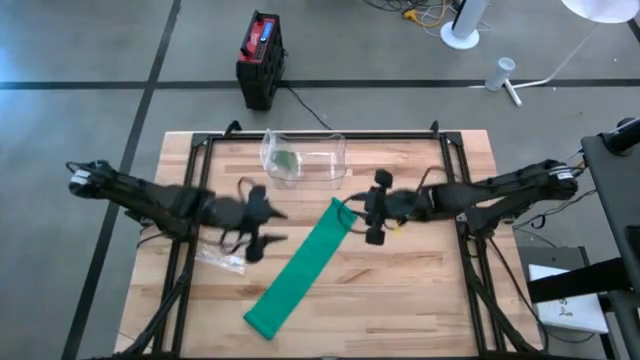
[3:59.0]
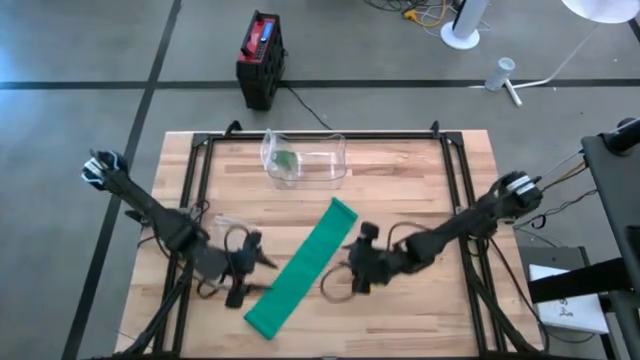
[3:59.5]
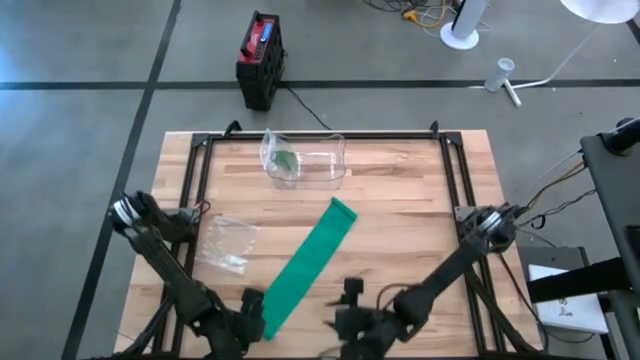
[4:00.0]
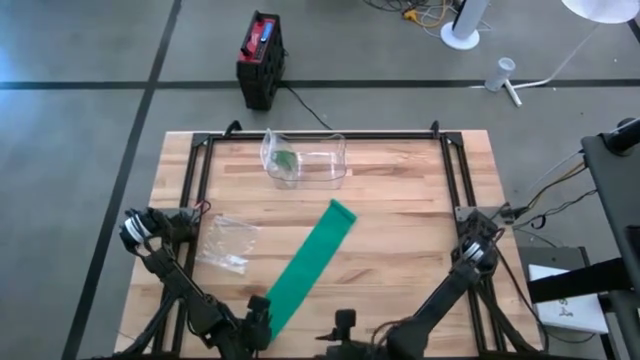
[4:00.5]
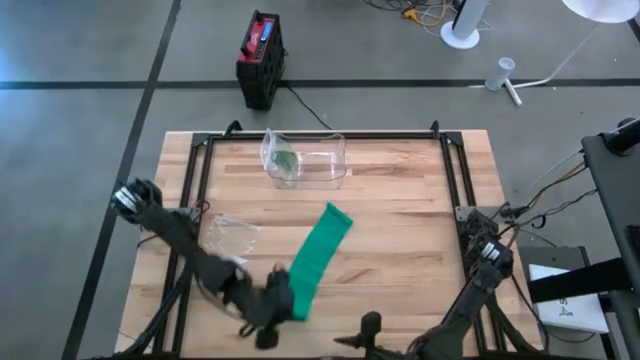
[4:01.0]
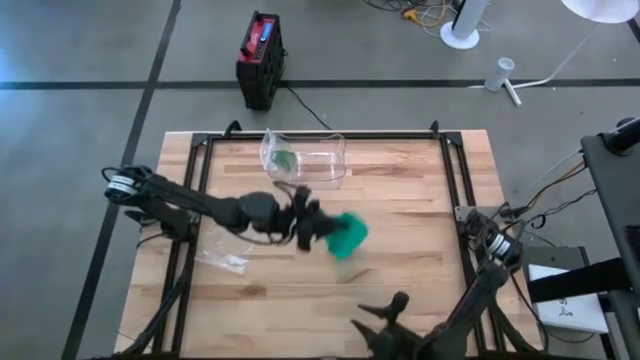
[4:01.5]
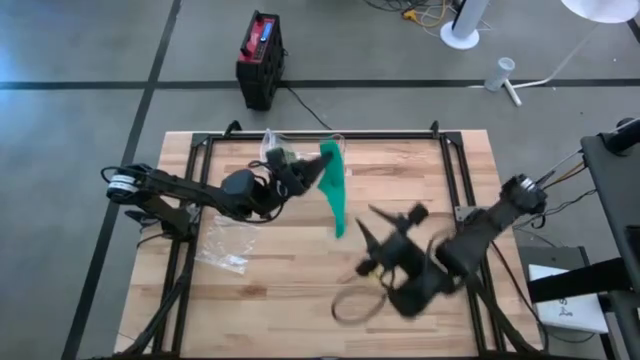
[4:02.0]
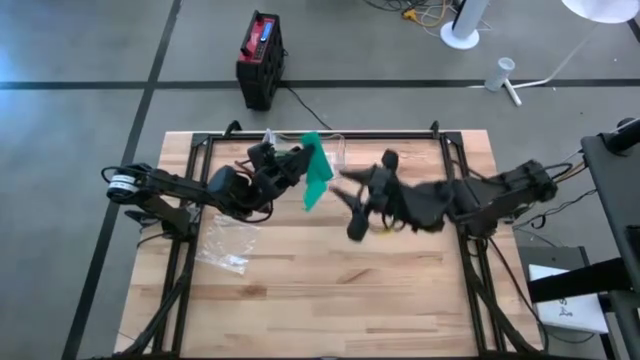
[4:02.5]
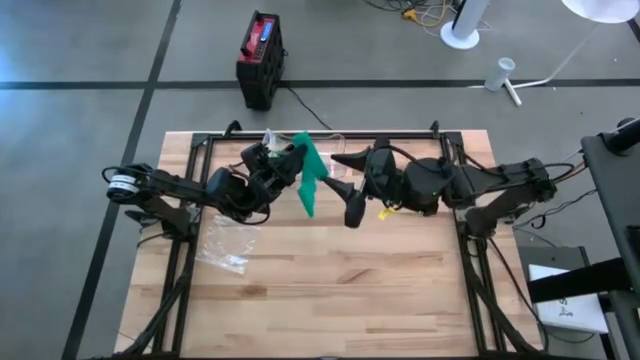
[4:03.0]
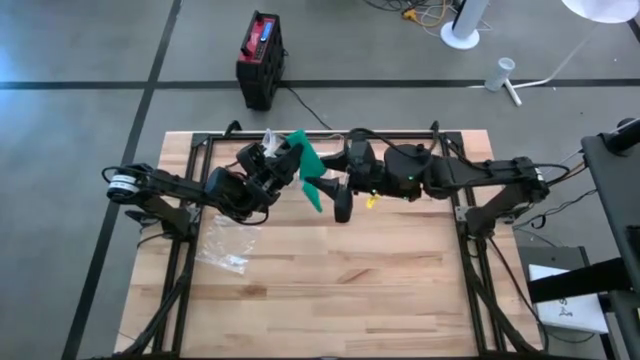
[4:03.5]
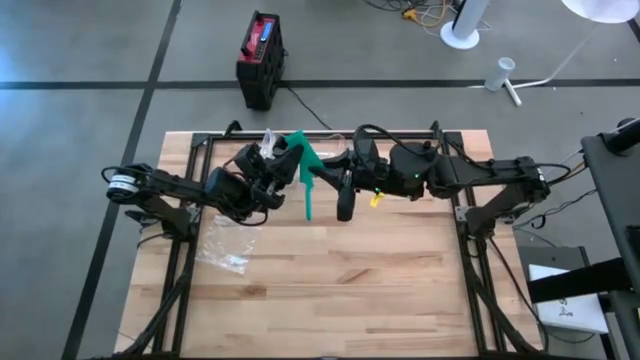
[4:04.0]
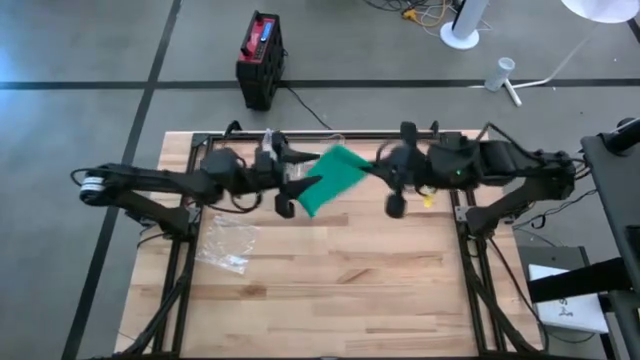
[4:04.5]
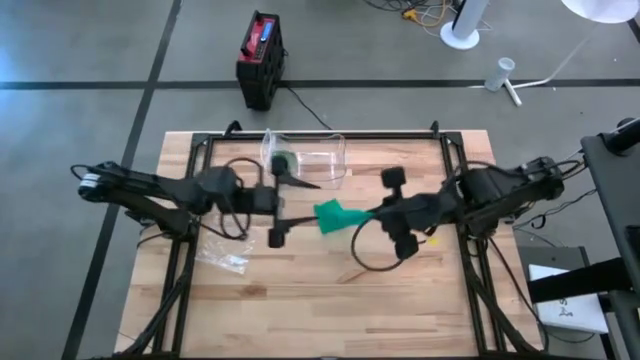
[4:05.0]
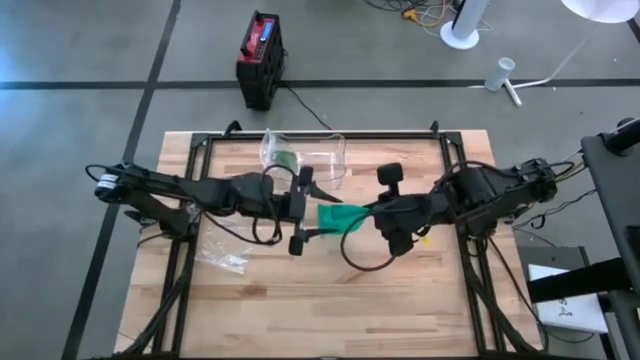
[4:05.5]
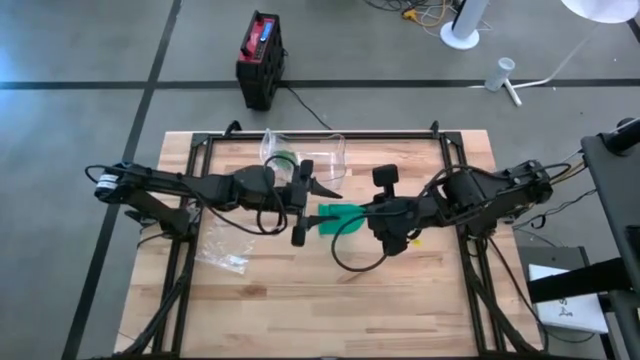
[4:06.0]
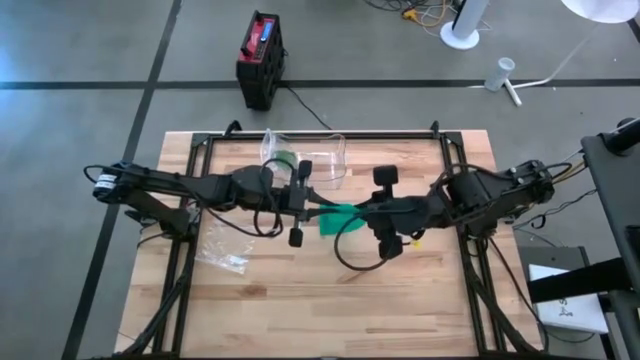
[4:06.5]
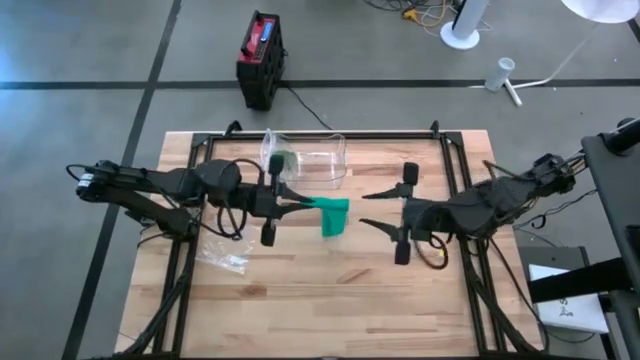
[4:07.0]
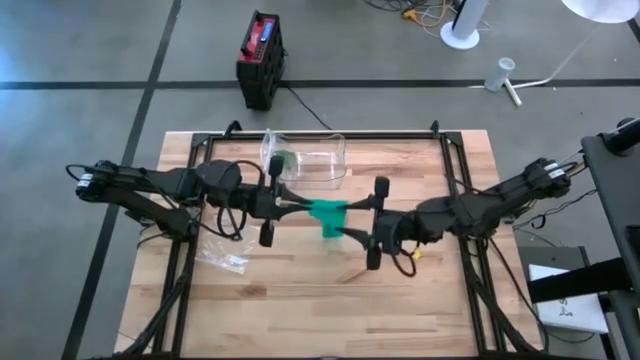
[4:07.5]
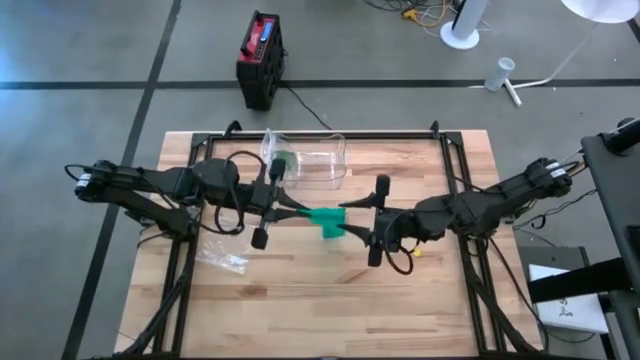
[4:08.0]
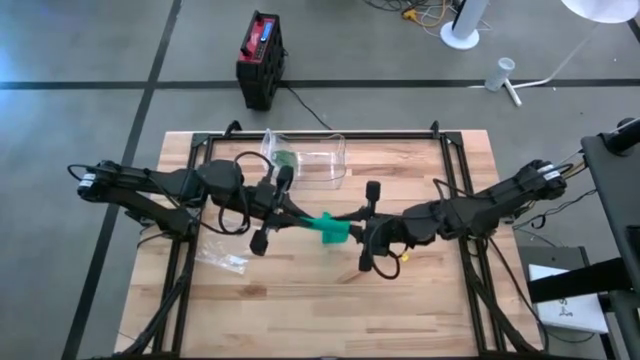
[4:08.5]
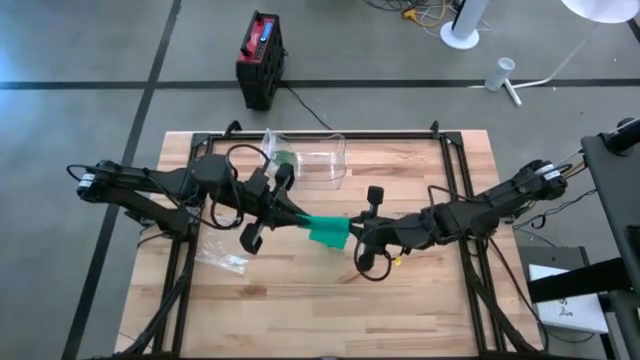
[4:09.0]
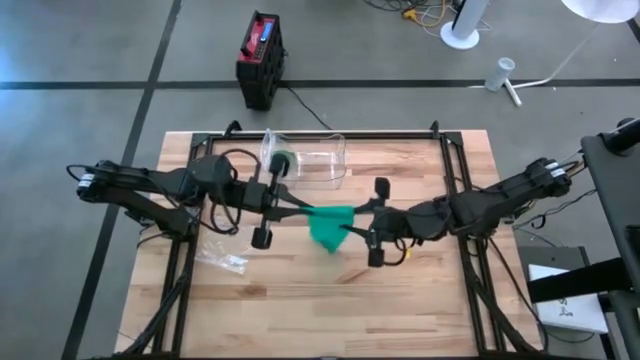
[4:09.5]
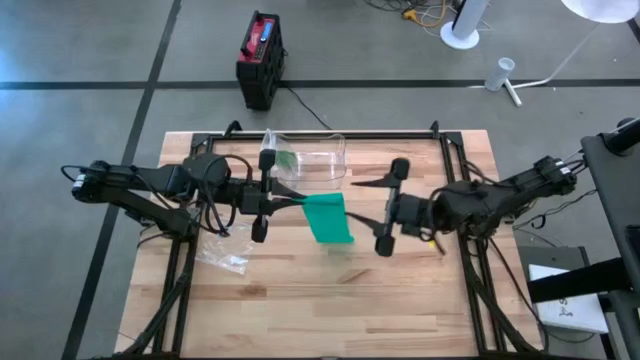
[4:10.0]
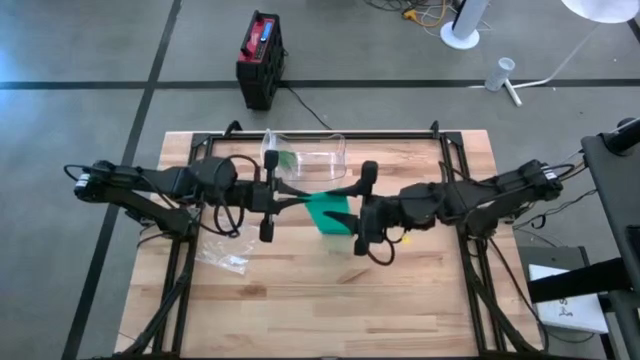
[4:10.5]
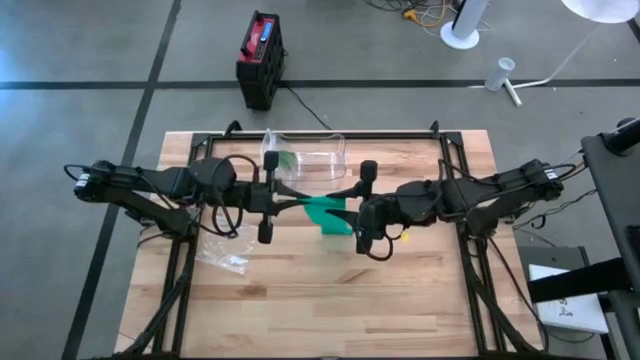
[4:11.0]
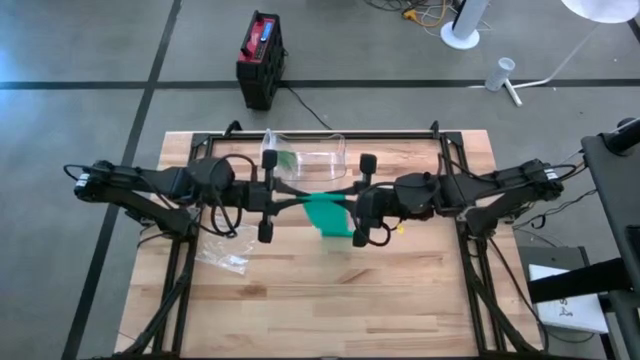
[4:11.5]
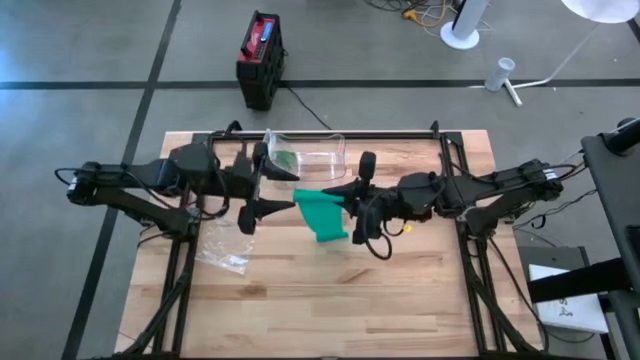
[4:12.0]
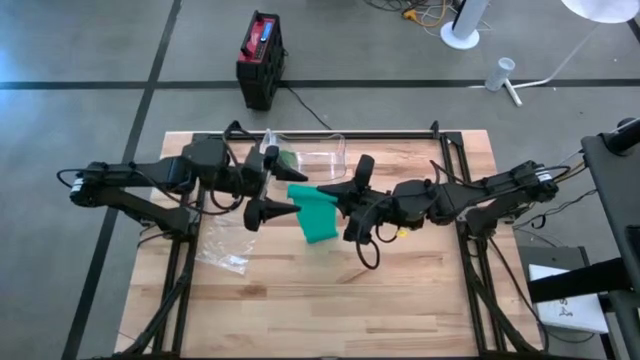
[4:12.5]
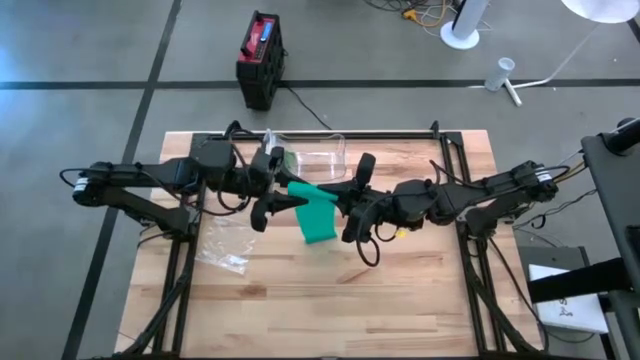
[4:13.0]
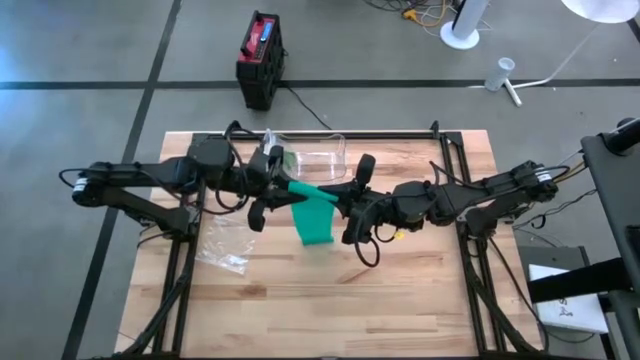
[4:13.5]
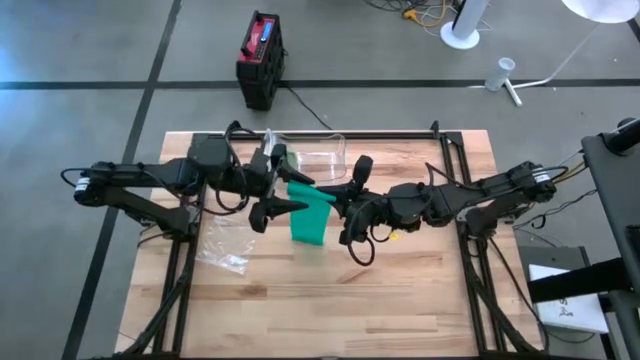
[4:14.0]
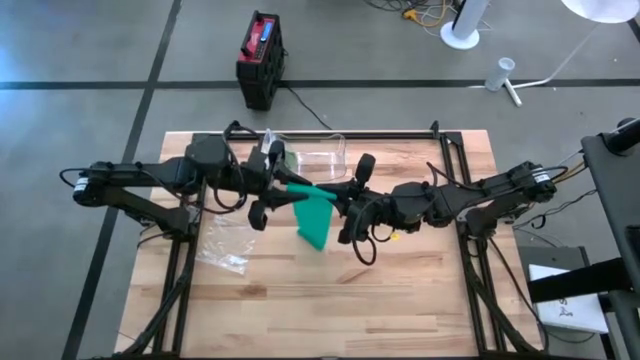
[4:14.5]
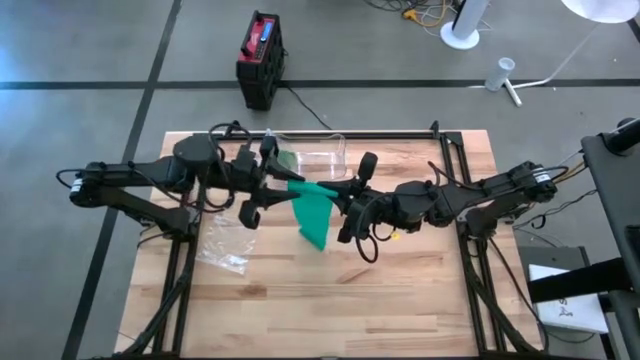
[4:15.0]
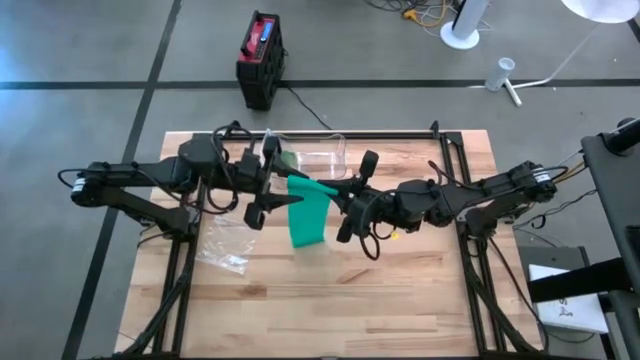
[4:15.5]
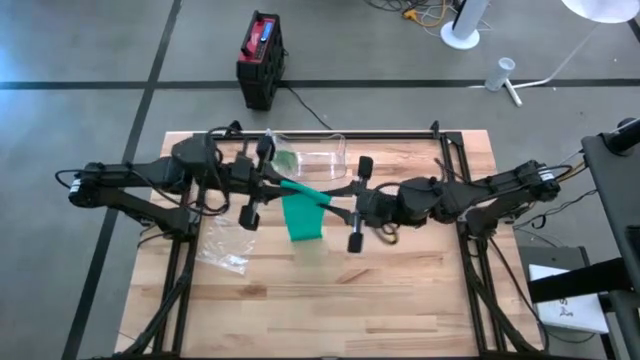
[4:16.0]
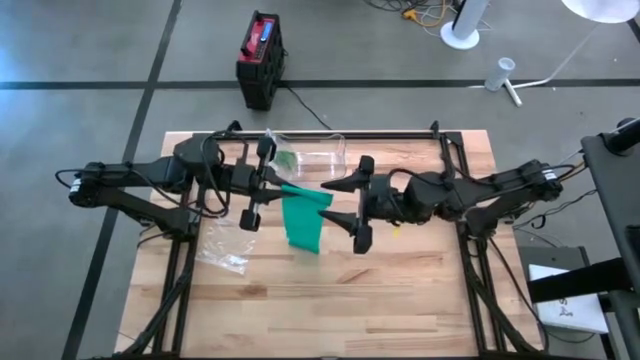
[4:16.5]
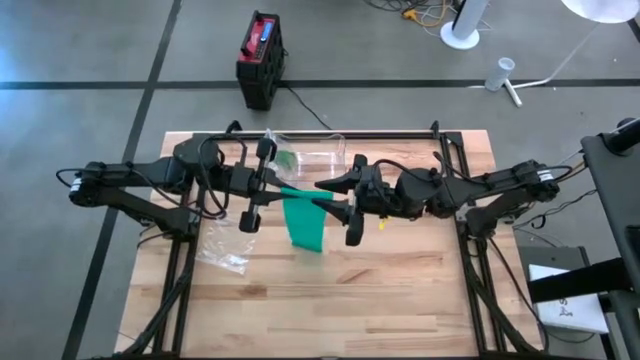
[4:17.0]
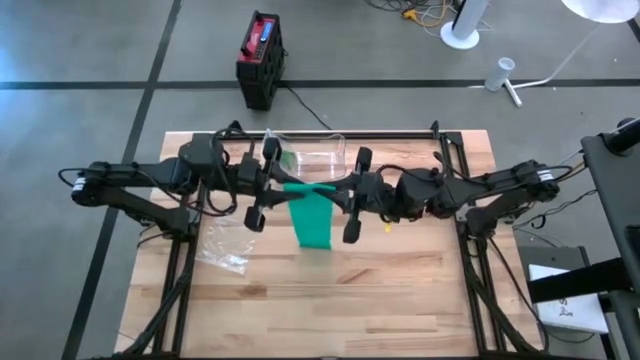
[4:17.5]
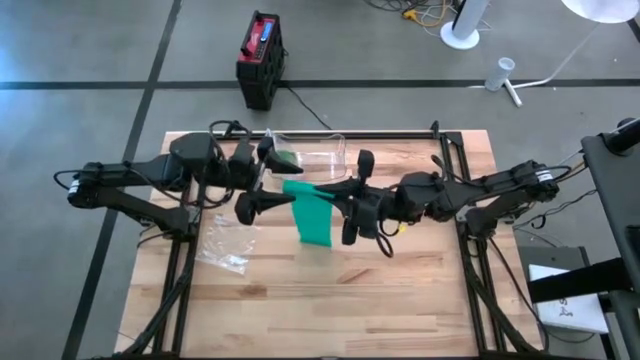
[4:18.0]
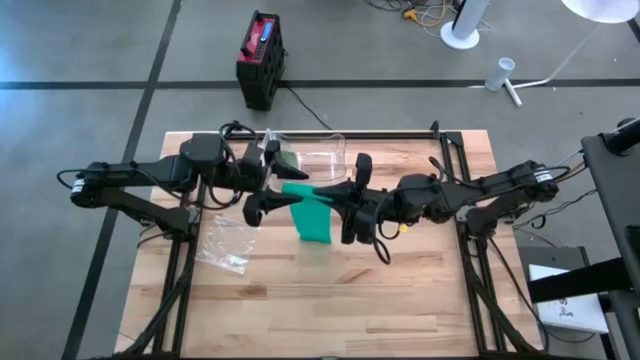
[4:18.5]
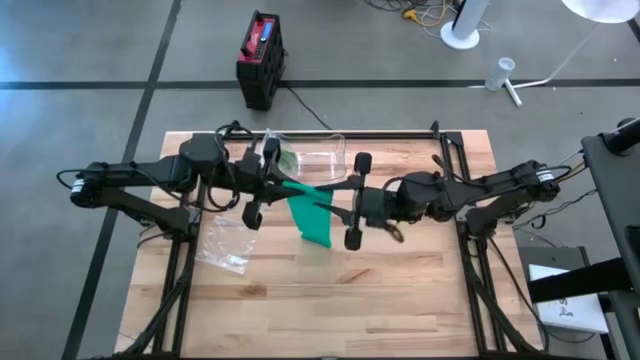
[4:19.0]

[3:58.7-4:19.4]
Task: Roll bandage
Roll the blue bandage
